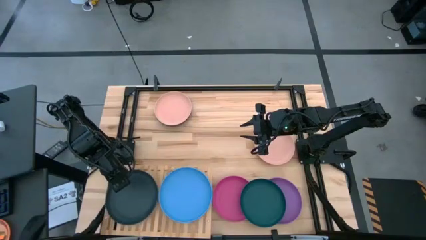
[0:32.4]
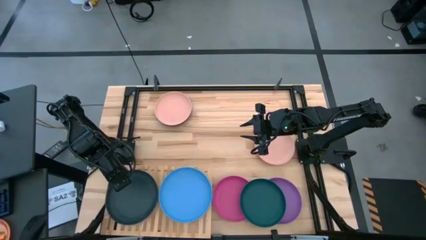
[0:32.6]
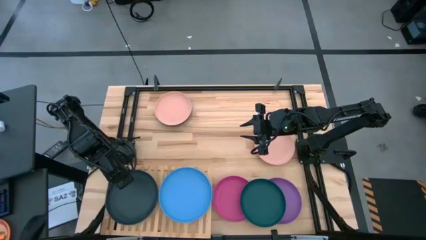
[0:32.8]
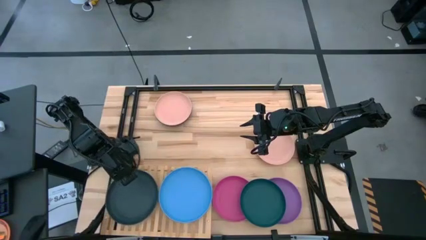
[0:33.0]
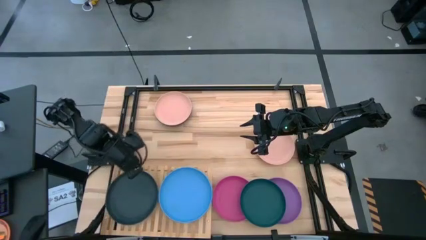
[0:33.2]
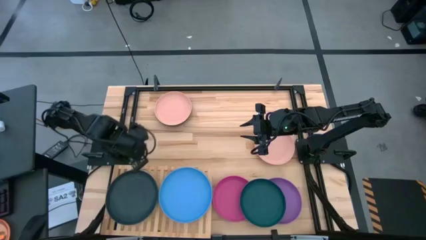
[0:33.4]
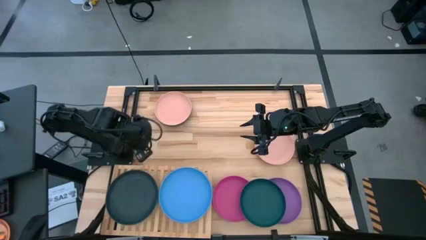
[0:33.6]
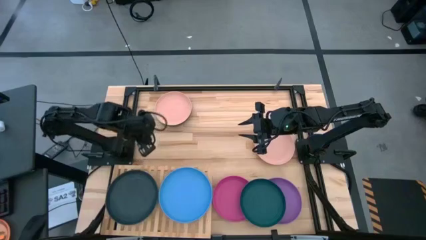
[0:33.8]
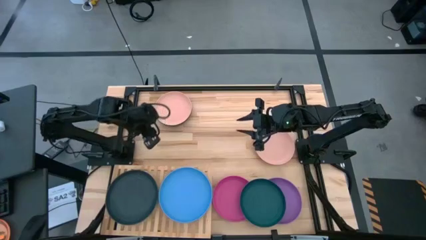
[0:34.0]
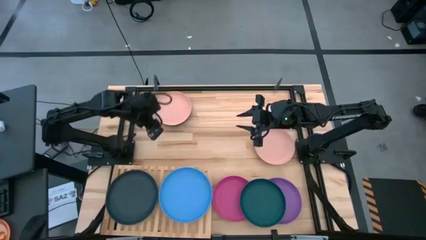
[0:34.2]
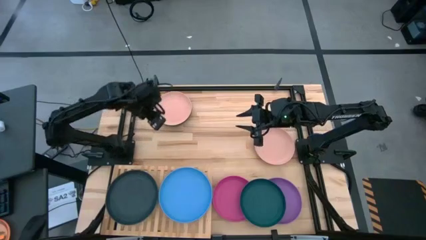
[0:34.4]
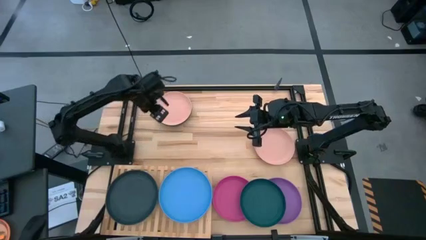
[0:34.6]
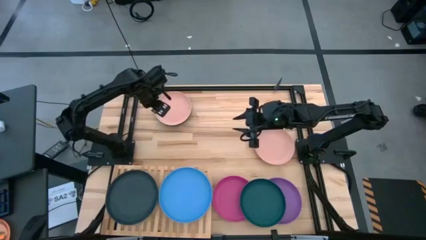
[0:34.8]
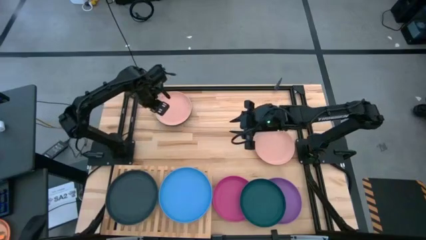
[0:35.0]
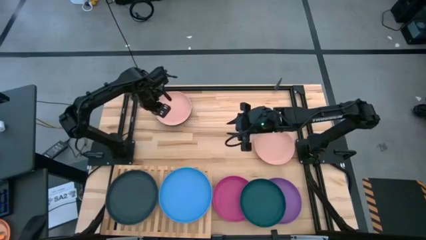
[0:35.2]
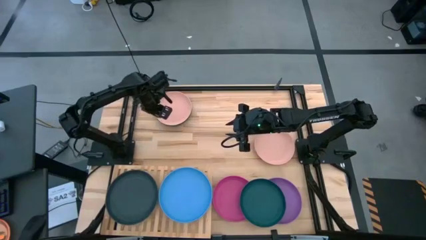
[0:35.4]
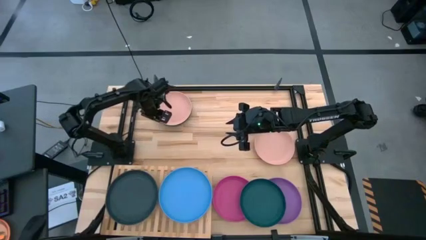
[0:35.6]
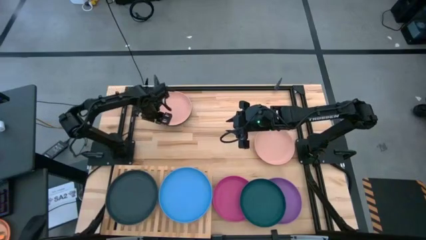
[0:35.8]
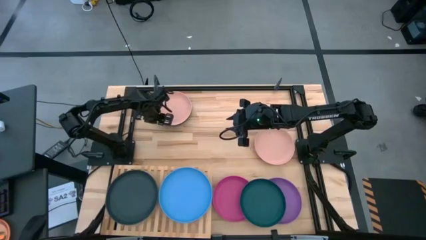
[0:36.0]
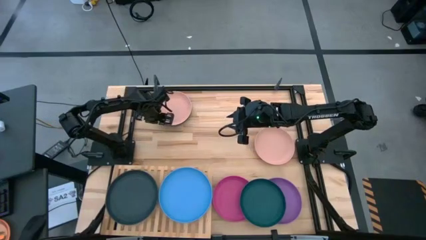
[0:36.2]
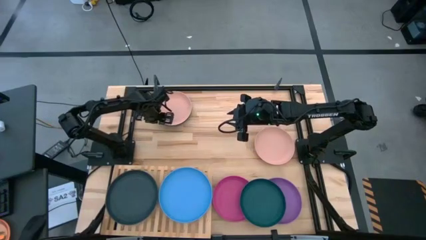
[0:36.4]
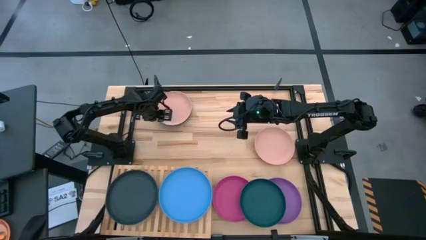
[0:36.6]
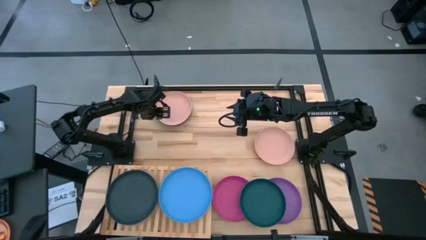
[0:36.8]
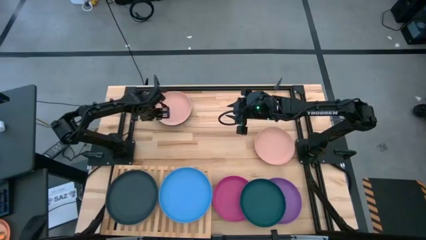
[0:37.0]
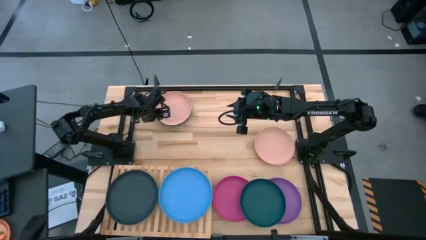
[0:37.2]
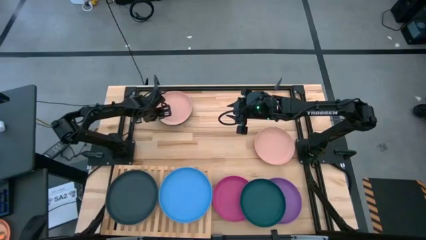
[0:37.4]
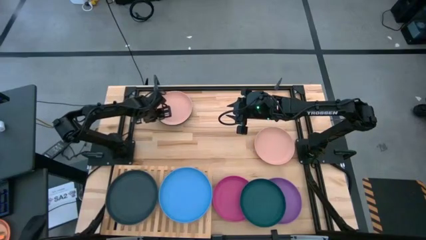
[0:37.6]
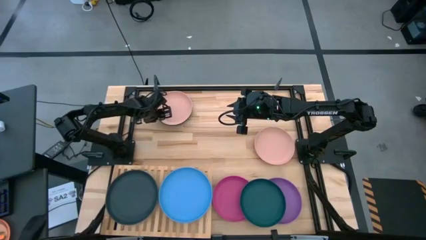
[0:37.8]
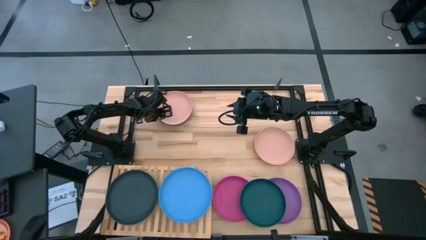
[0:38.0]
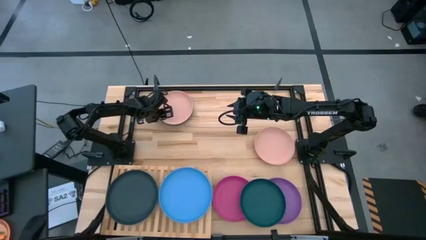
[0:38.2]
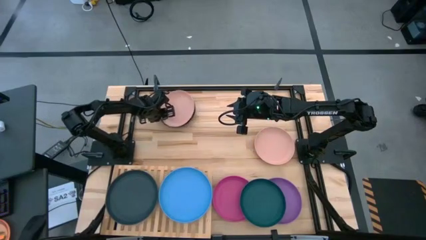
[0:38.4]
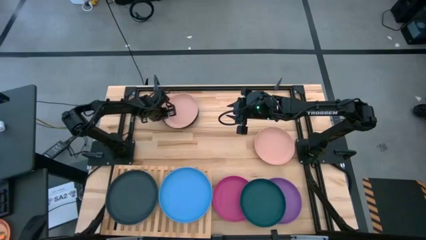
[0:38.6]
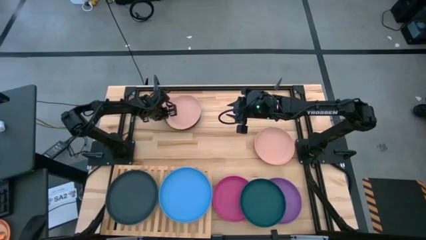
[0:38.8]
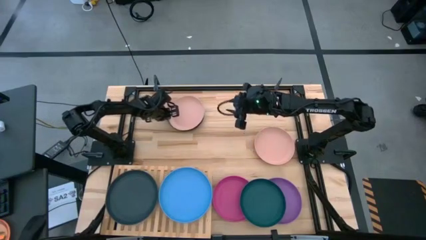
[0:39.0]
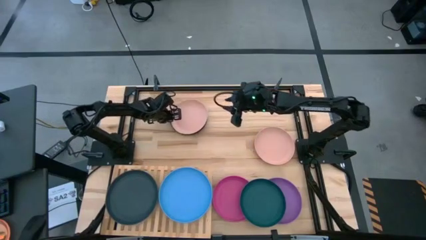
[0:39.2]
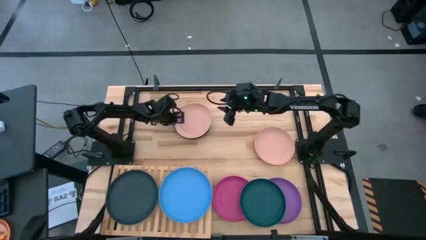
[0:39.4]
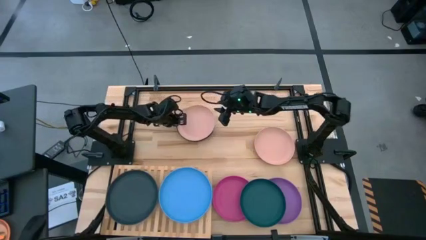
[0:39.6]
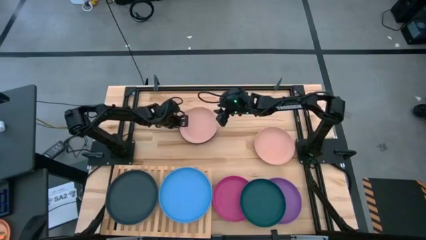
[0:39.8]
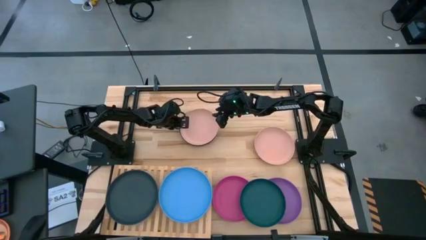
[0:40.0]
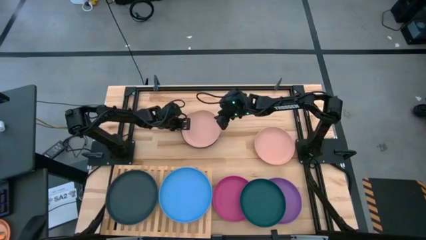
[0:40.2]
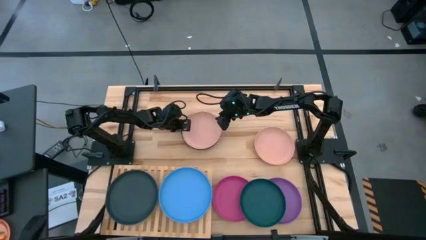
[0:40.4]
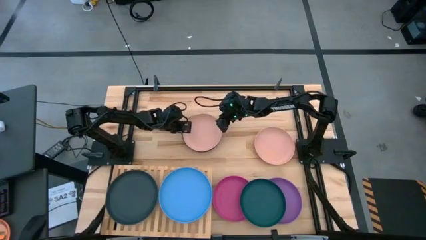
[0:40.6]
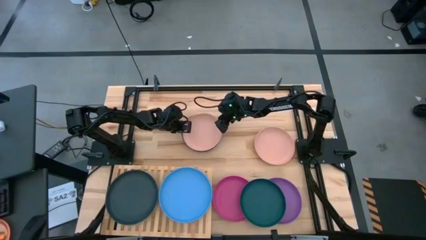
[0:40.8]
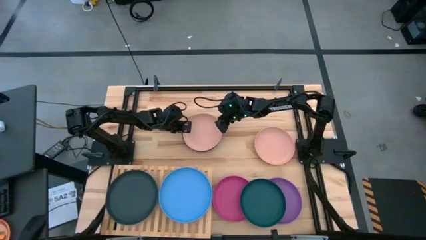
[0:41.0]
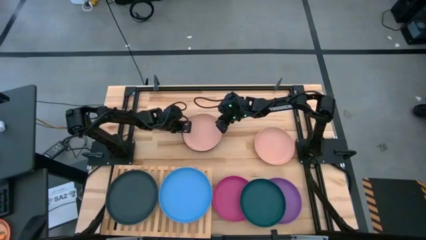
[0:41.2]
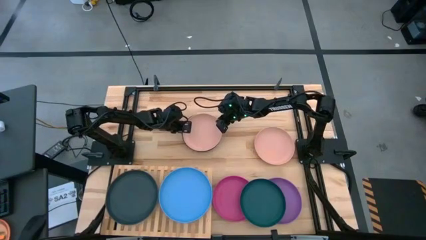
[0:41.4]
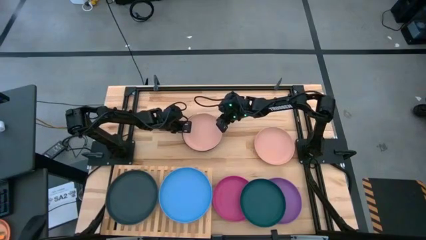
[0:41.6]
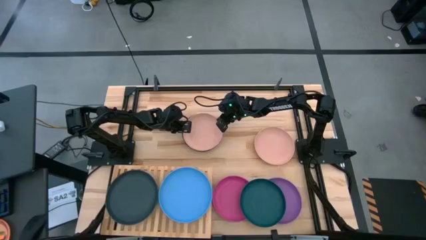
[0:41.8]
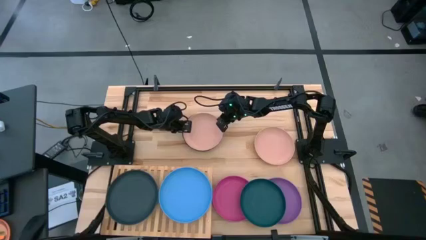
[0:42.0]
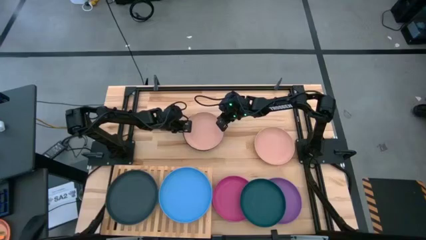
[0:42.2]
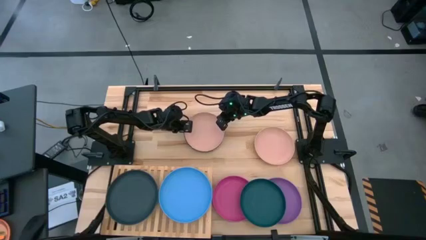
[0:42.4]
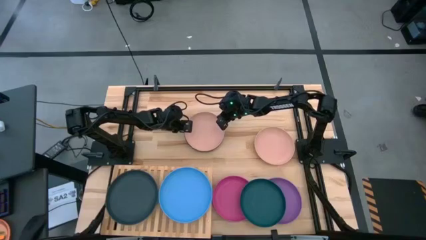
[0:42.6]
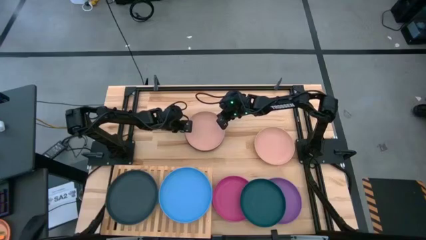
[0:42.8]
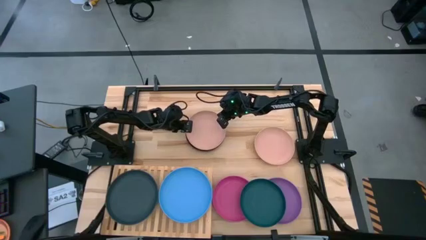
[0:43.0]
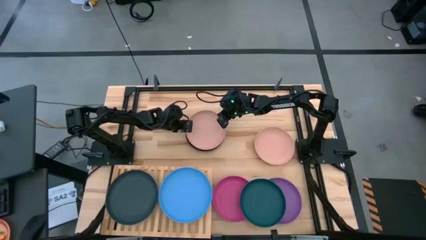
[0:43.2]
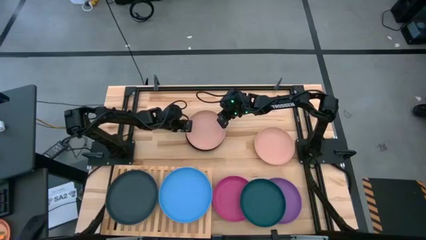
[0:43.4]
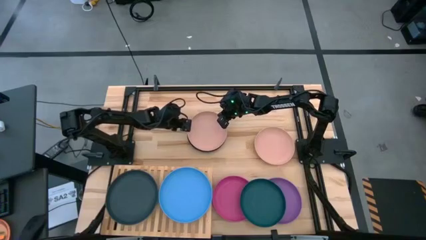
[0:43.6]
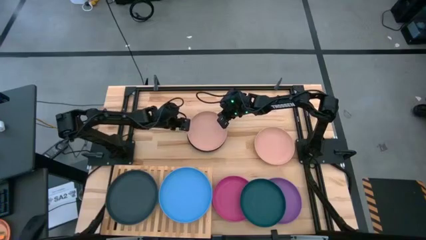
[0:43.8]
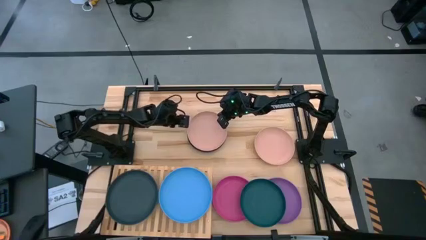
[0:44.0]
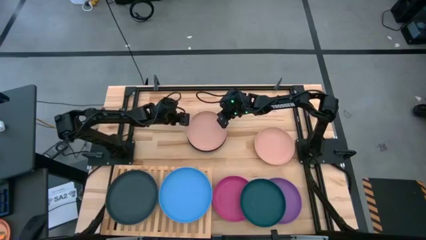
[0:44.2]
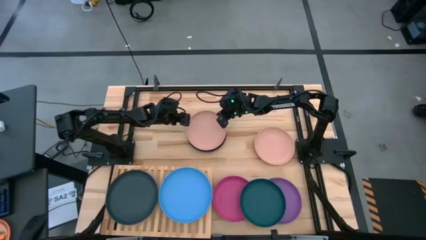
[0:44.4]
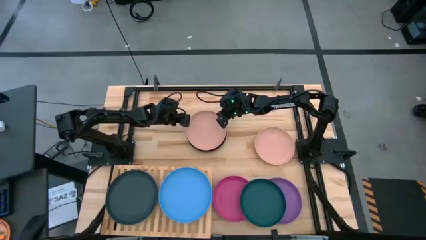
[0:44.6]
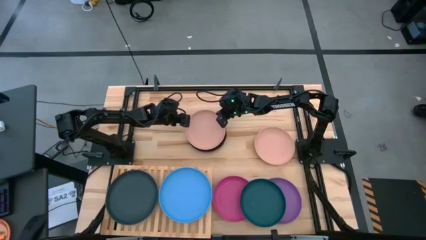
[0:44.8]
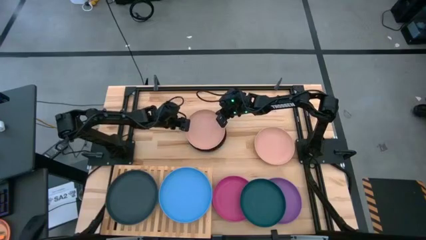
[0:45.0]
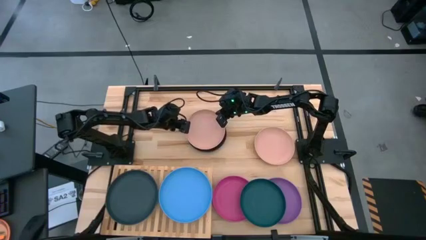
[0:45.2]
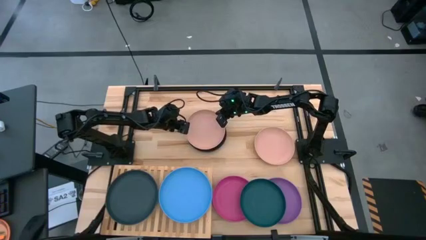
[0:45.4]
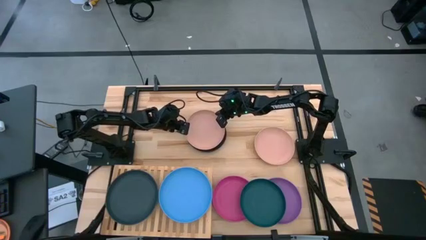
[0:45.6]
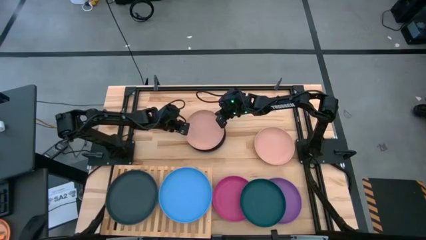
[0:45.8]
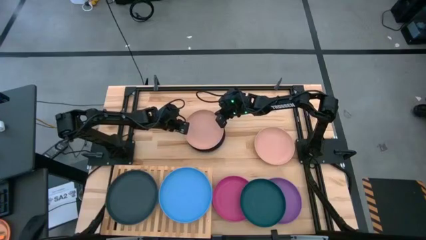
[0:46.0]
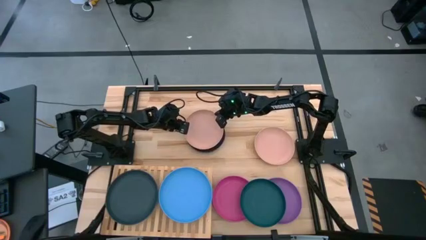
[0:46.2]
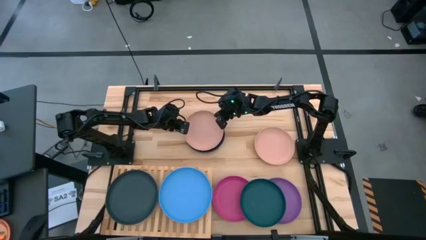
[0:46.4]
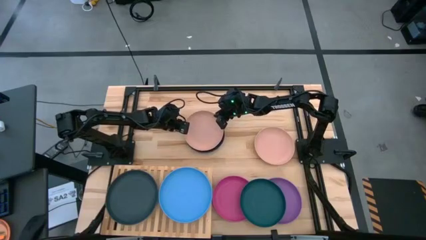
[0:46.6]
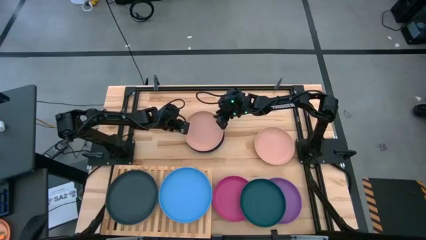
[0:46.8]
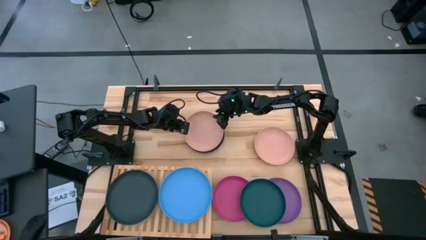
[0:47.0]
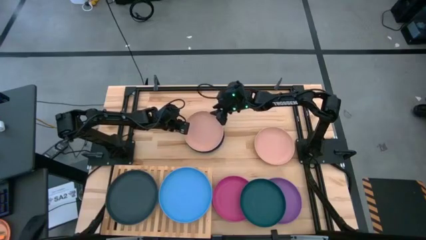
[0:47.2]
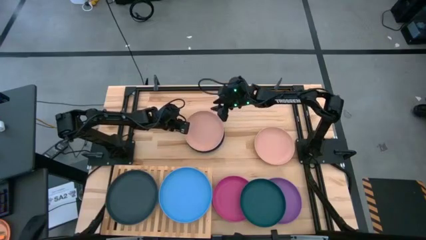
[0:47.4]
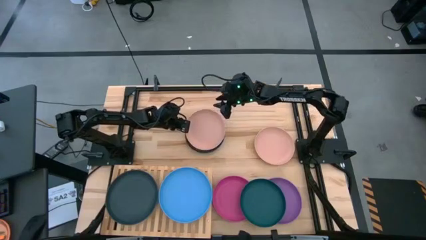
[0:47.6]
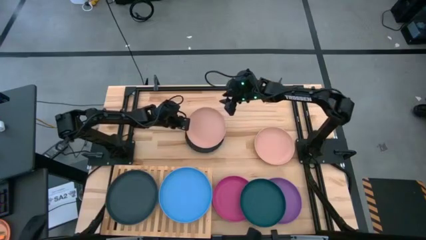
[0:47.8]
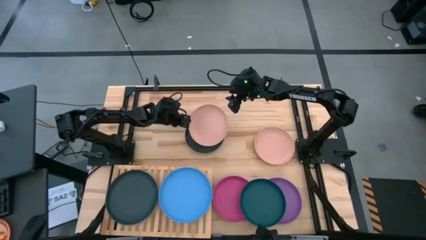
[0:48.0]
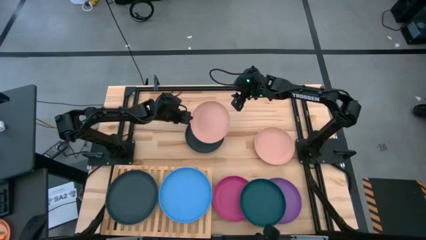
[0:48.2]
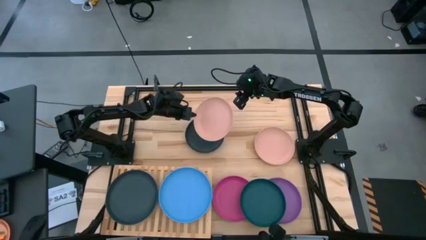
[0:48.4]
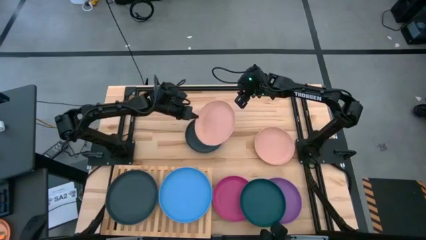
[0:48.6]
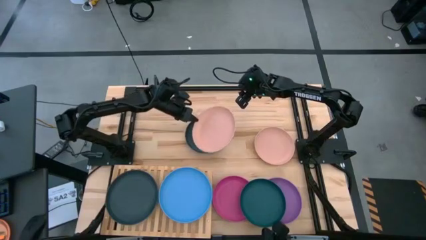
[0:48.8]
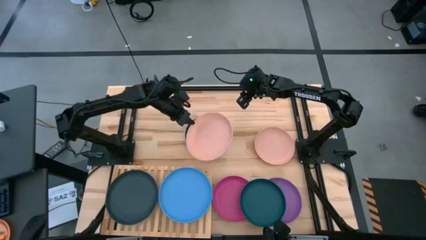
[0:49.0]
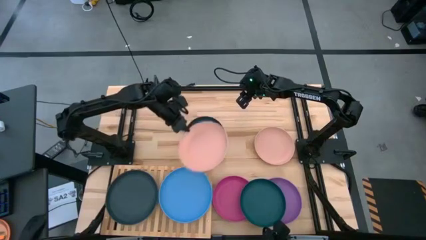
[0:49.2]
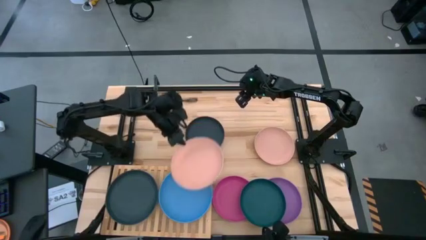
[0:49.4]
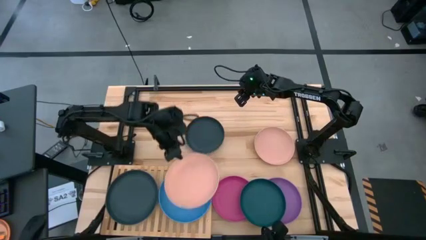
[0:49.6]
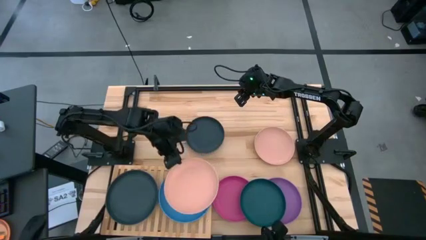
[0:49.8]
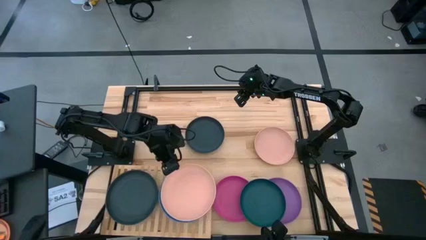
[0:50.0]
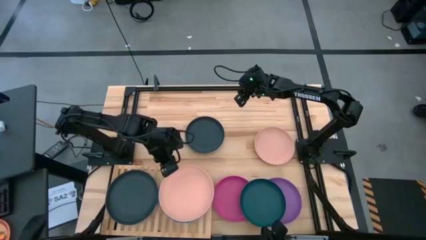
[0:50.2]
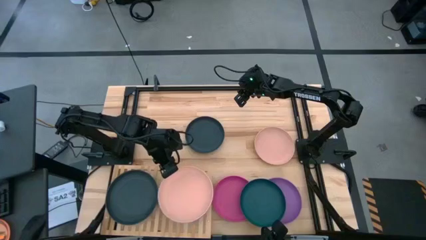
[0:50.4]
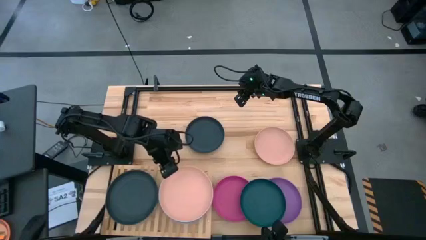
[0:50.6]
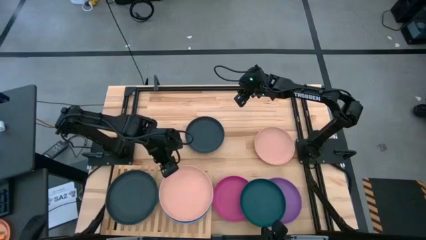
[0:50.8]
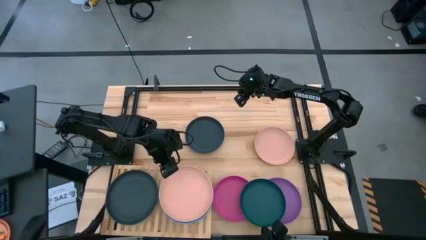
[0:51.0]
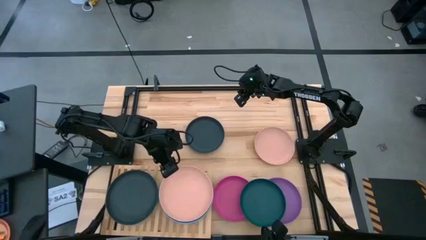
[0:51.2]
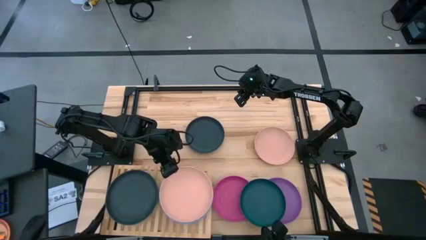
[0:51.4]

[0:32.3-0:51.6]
Task: Place and stack plates onto a shelf
Stack the left light orange plate on top of the blue plate on the shelf
